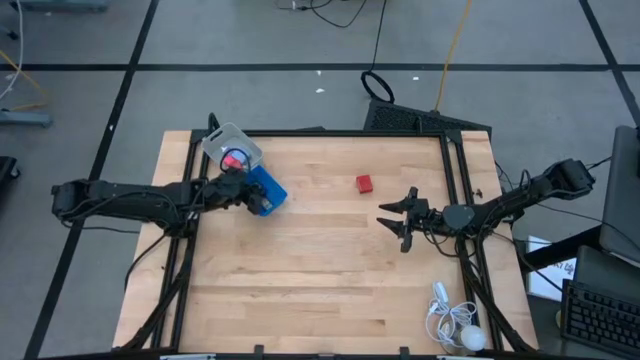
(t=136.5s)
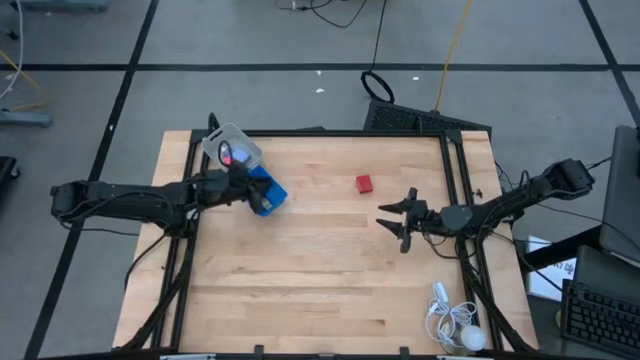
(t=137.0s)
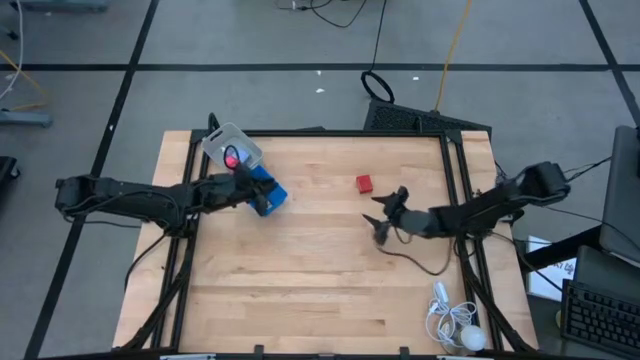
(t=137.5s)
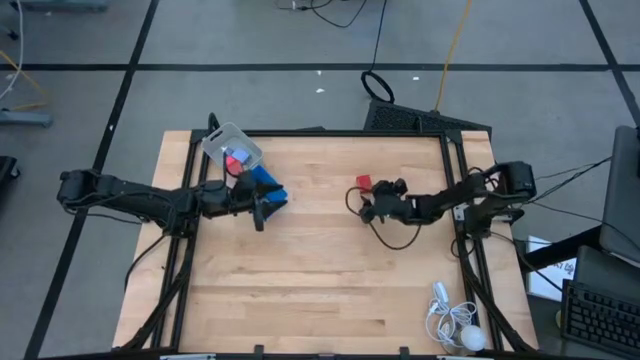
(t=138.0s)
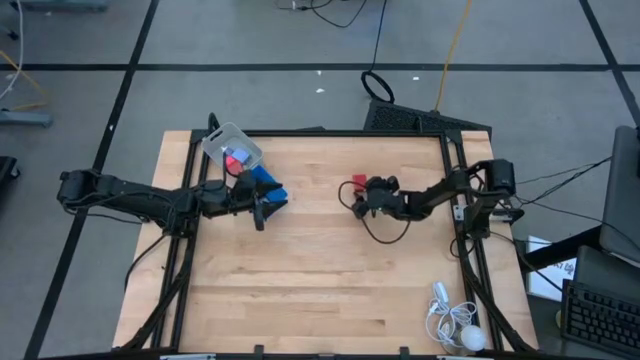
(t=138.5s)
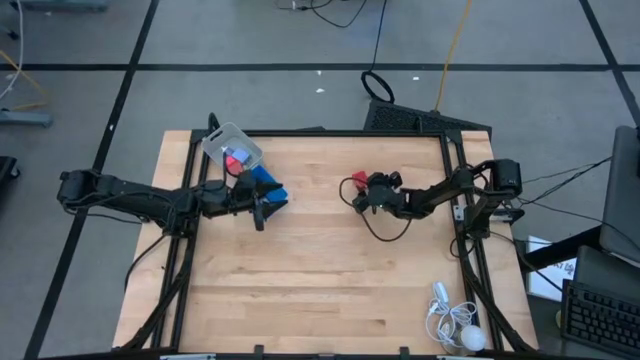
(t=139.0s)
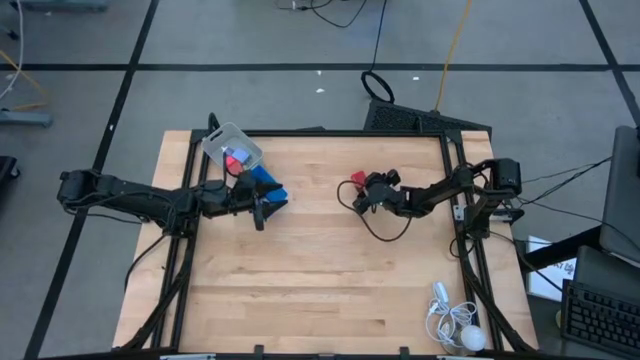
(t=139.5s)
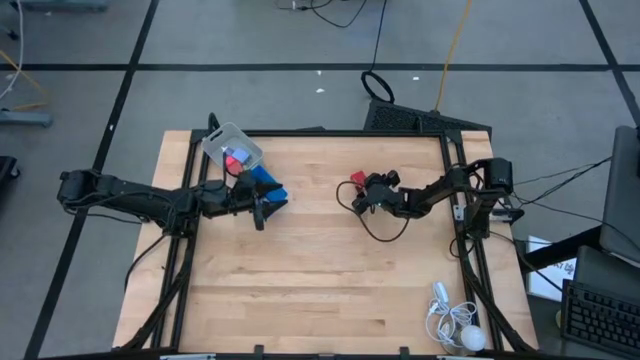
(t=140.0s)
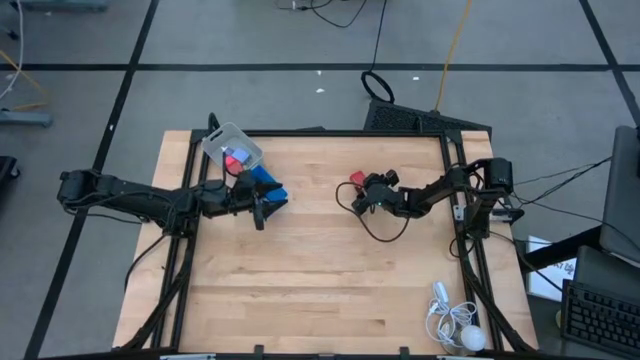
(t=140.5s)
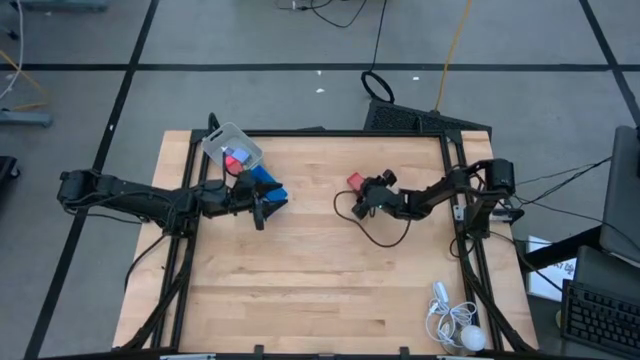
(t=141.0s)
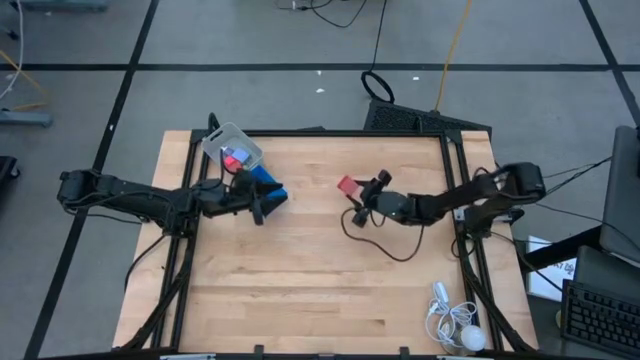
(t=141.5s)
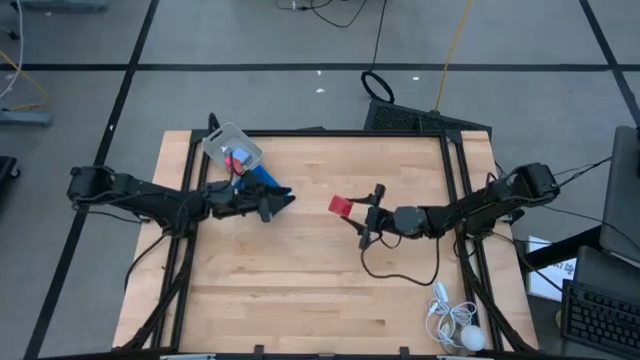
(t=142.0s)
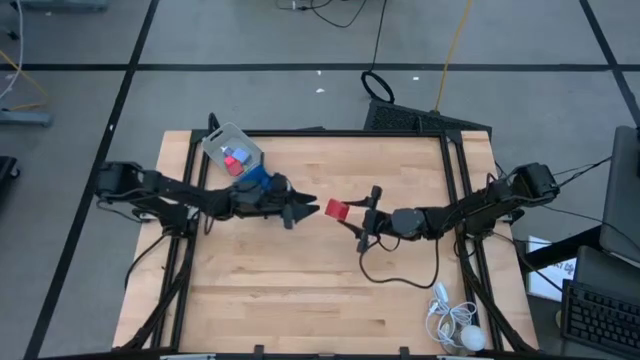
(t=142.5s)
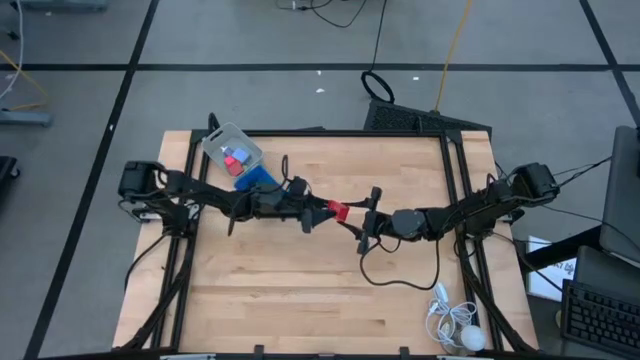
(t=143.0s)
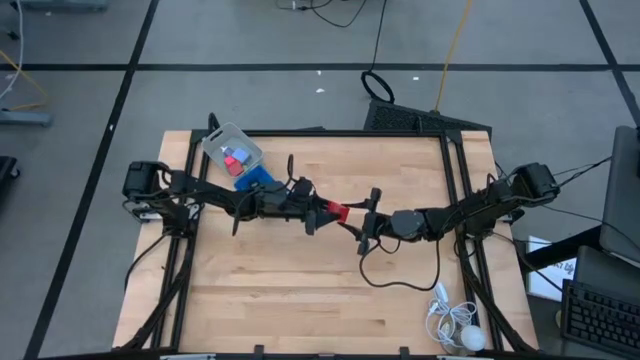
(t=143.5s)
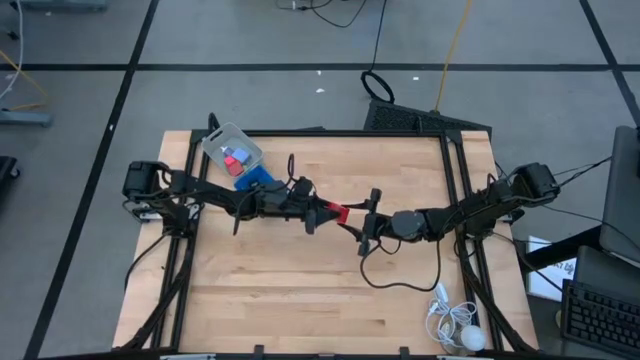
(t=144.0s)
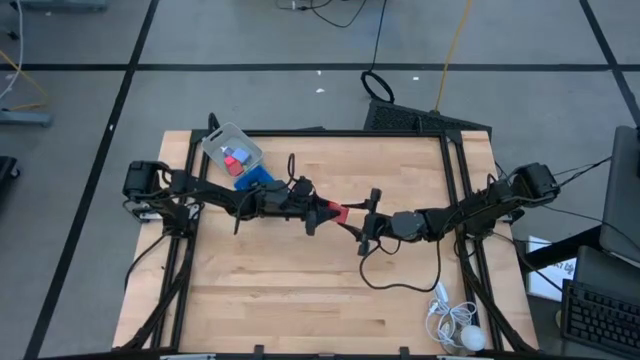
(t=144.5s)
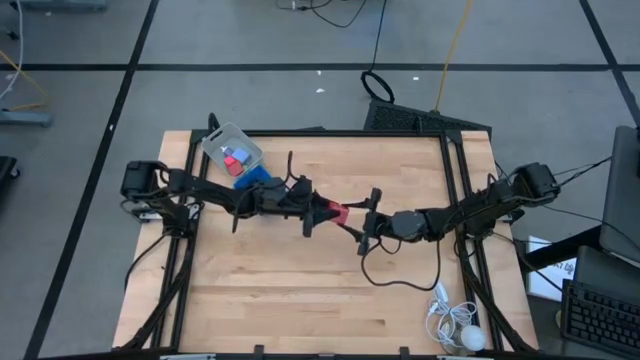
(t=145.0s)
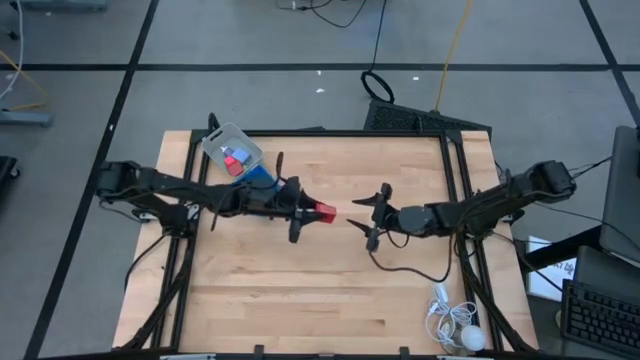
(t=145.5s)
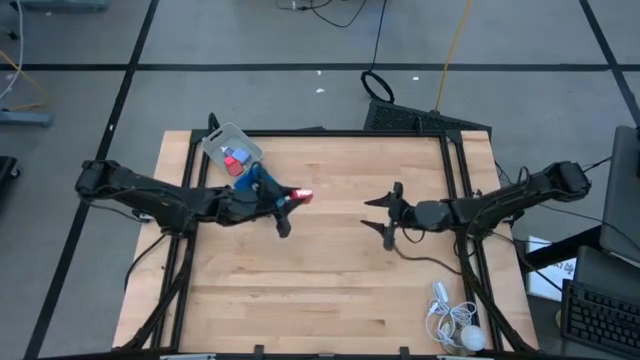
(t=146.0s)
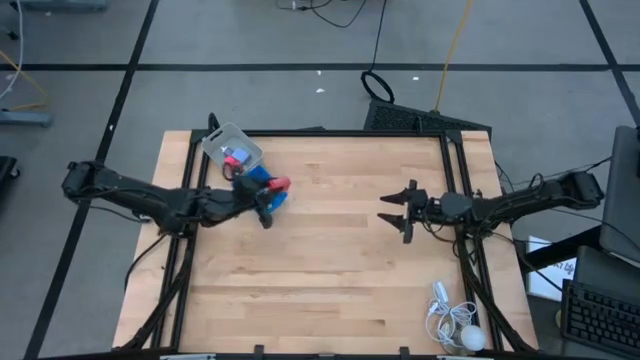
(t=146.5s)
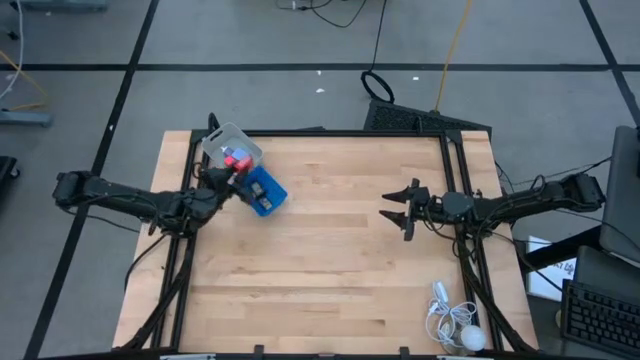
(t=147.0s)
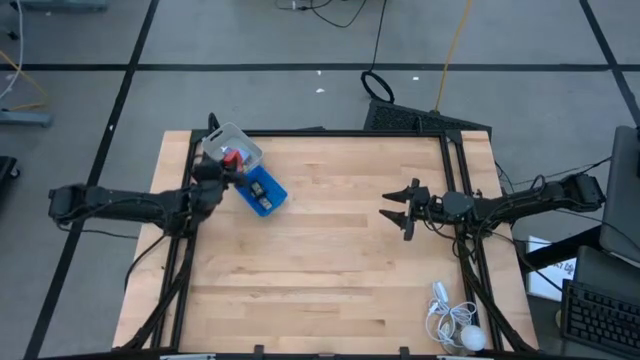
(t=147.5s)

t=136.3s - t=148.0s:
Task: Pick & Place Office items
Put the red charger adapter into the gray bin

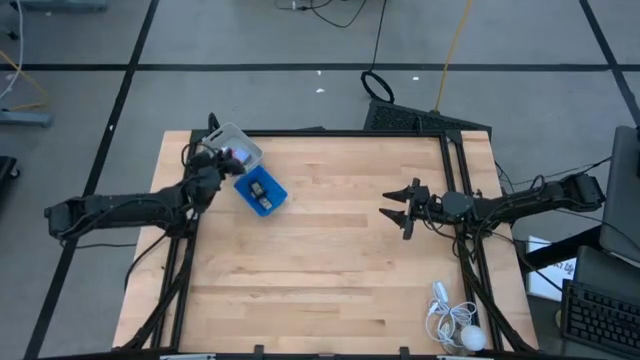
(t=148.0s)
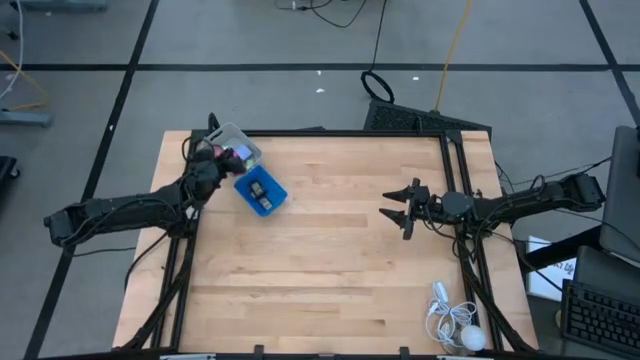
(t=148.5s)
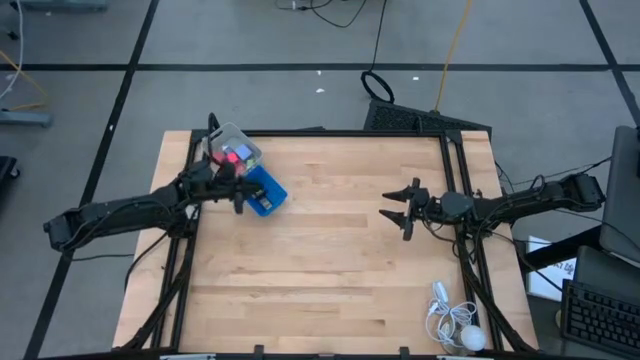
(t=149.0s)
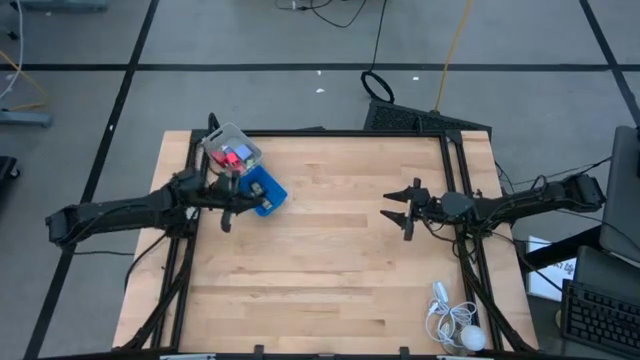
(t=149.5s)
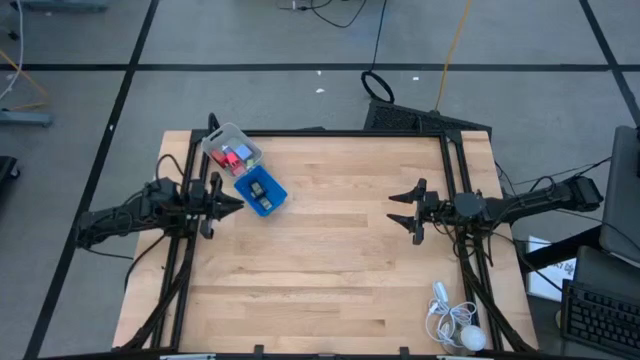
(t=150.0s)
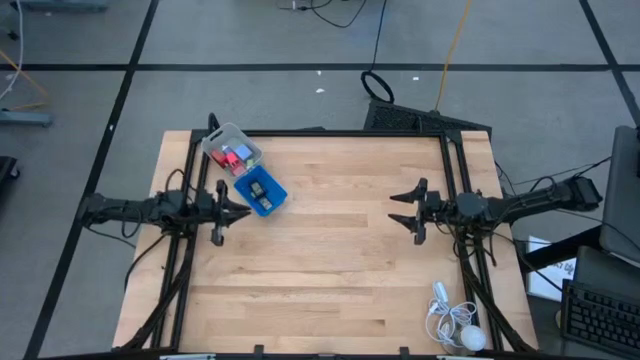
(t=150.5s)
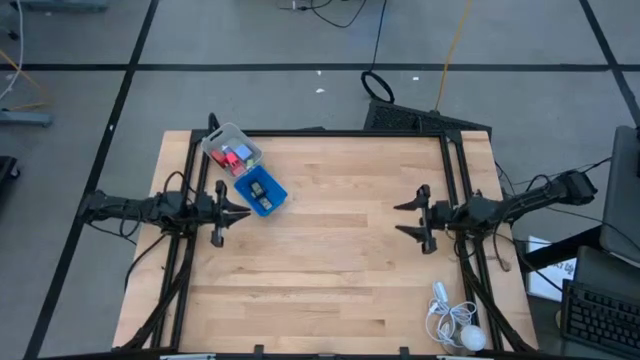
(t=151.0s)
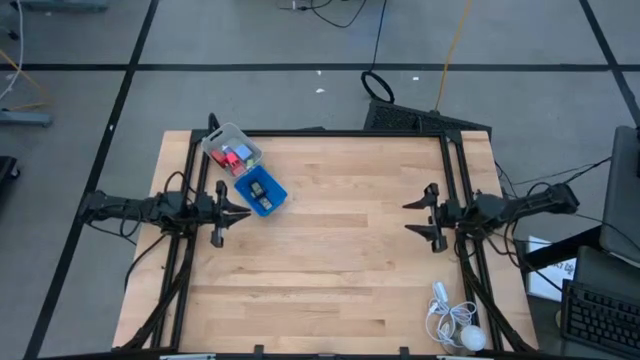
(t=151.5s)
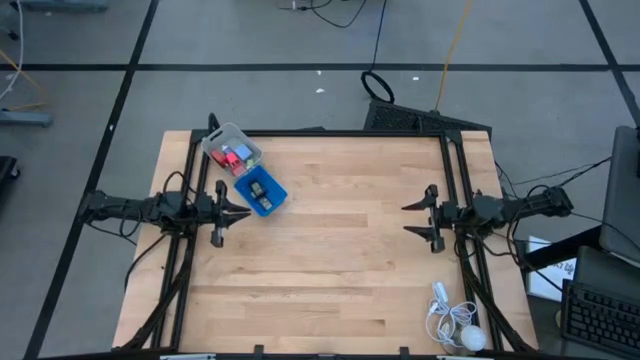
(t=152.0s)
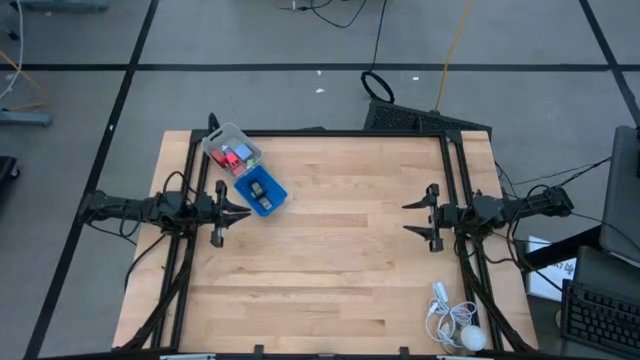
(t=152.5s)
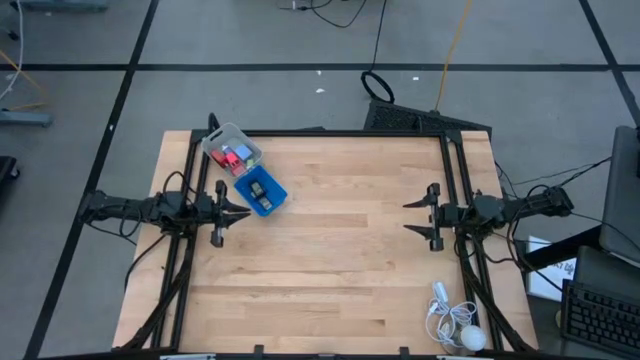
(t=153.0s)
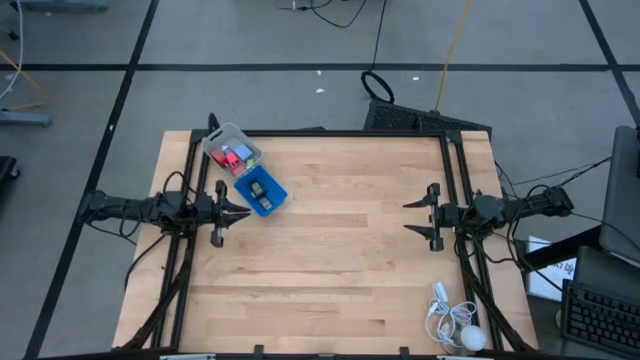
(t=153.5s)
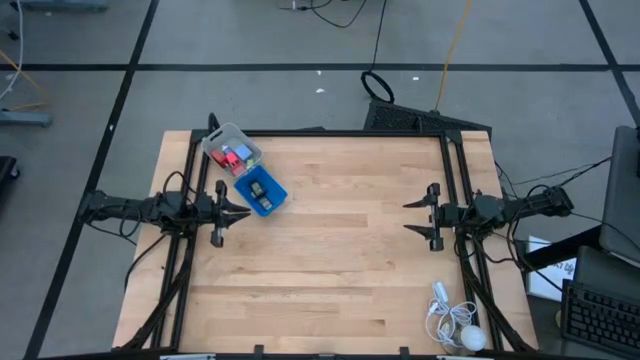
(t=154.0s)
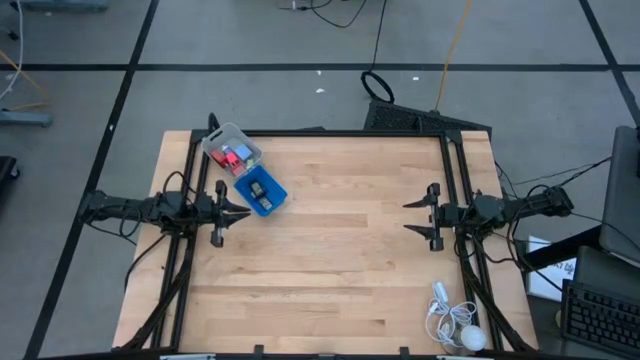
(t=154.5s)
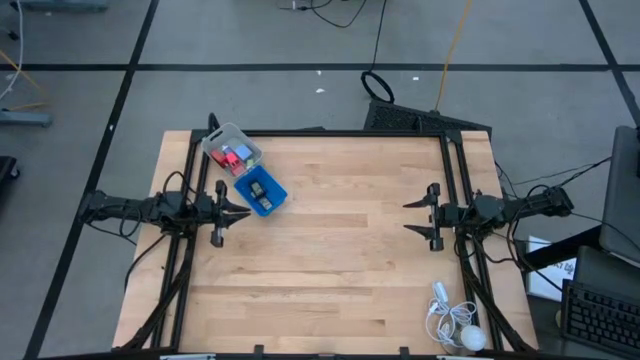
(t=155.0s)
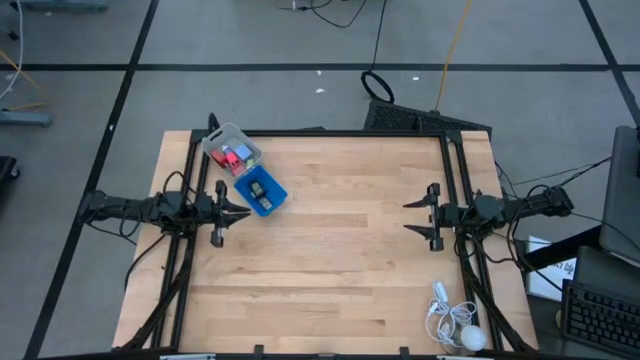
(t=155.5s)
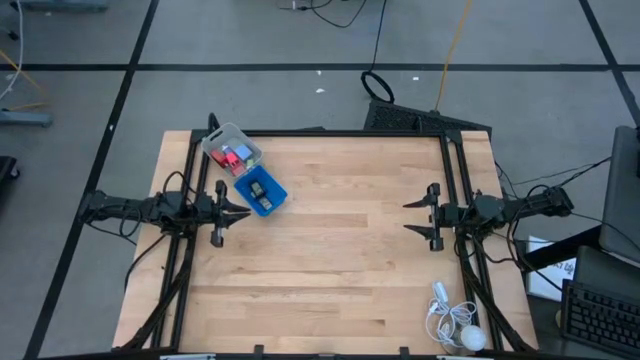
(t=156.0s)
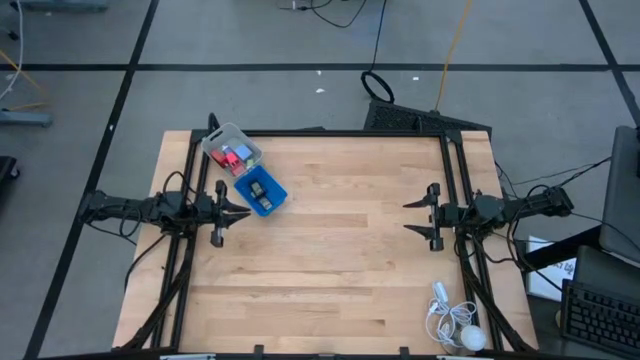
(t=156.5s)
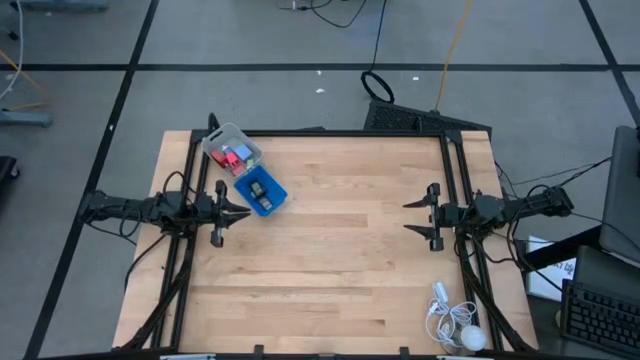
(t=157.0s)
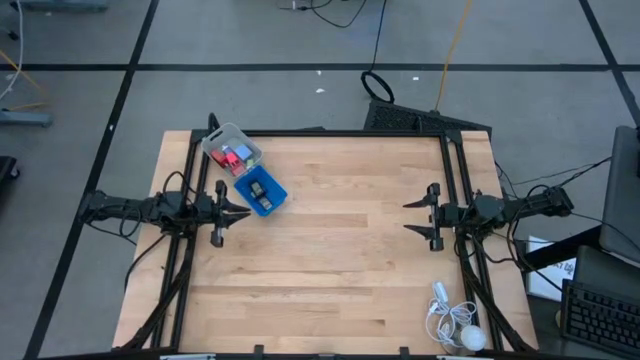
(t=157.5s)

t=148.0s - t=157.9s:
Return to Home Position
